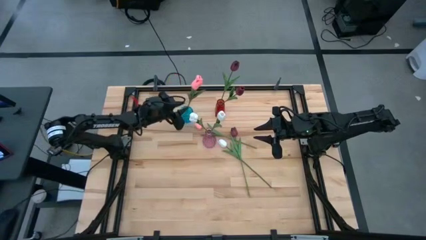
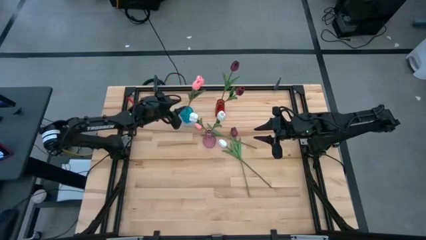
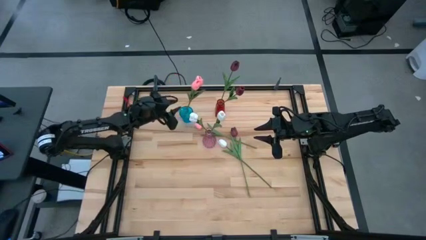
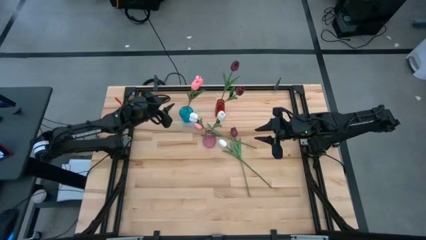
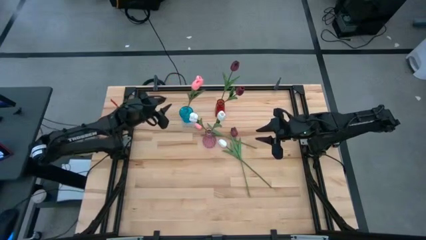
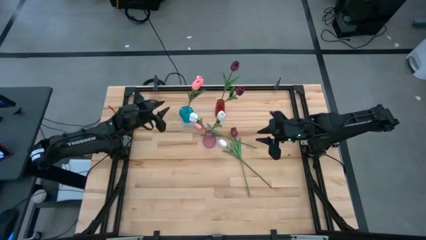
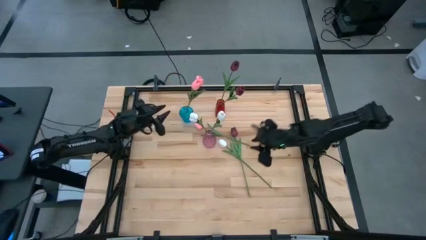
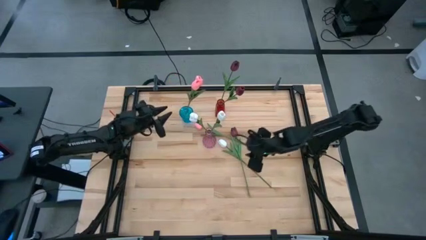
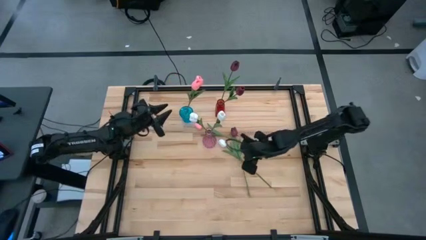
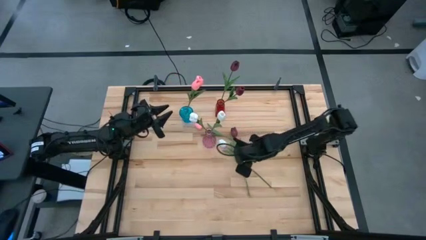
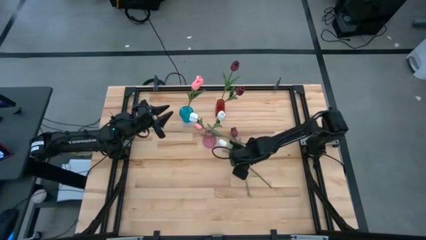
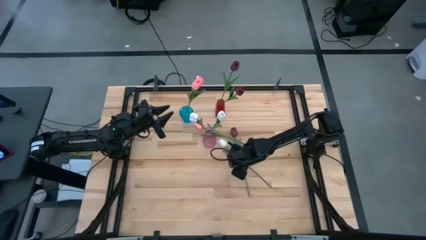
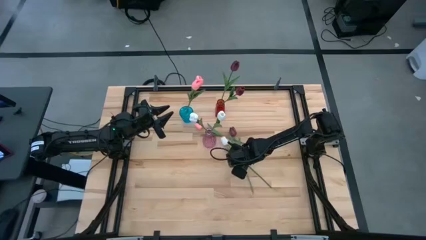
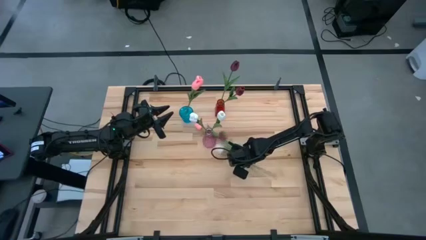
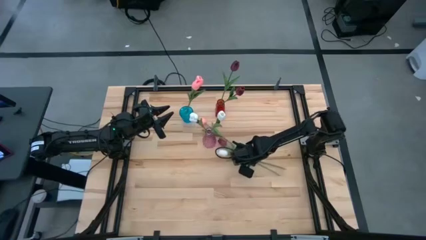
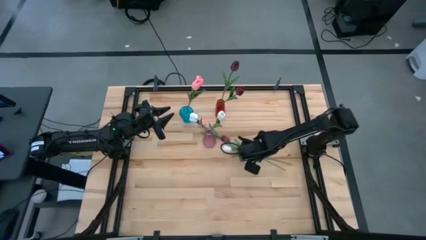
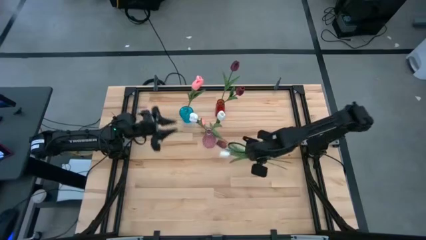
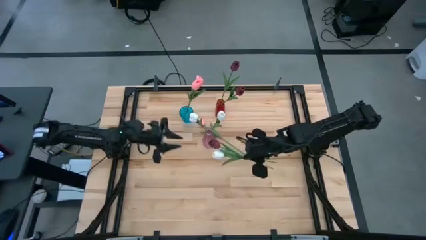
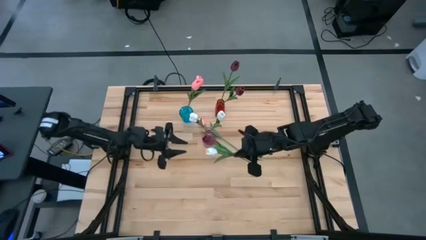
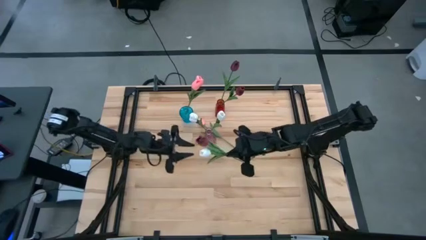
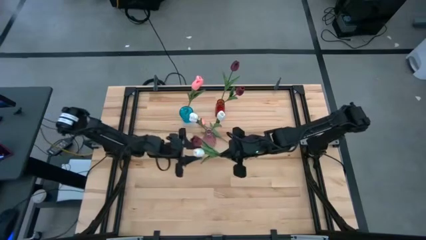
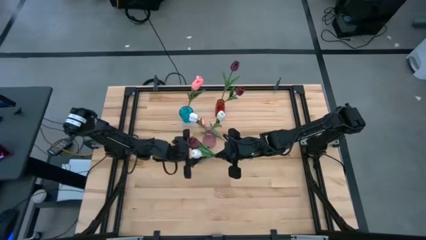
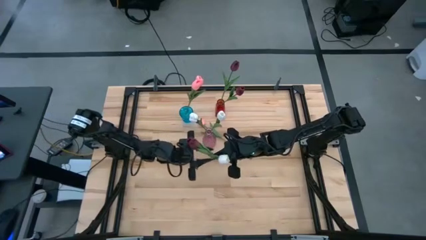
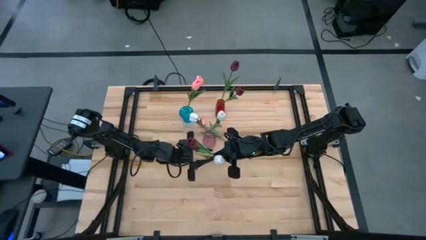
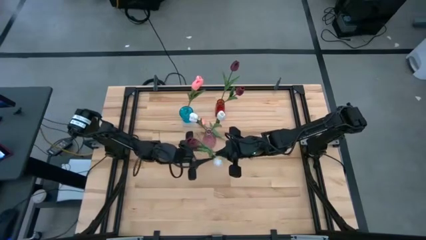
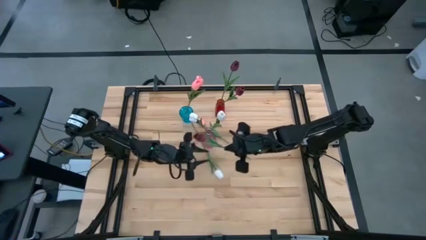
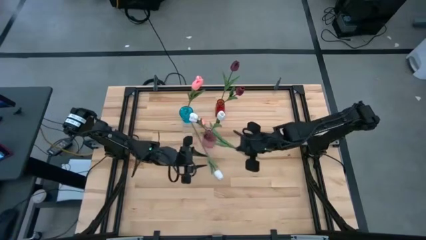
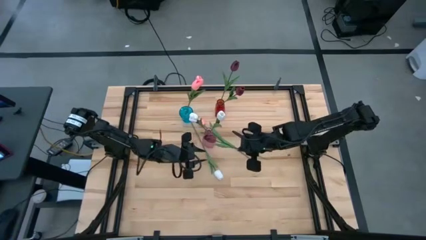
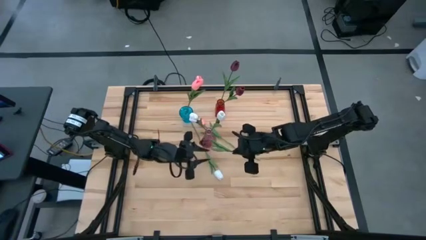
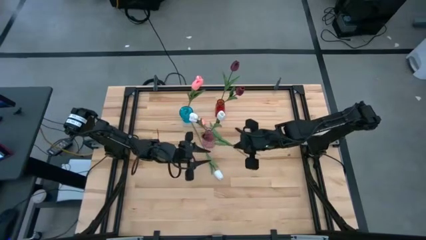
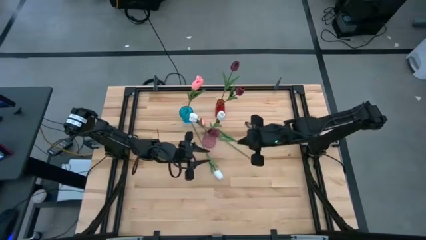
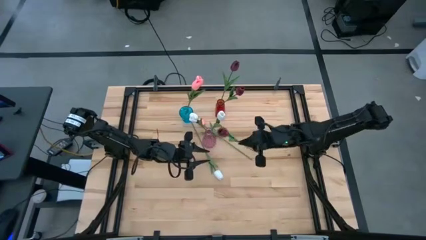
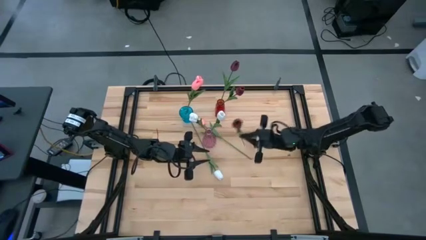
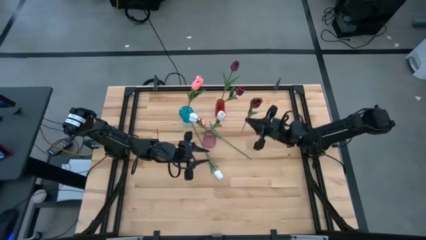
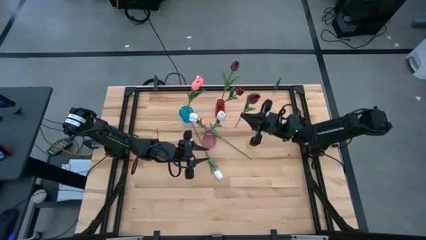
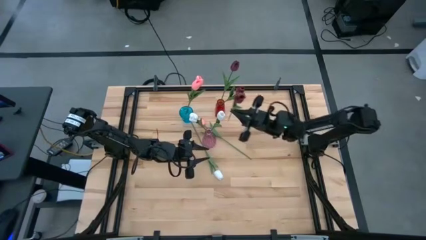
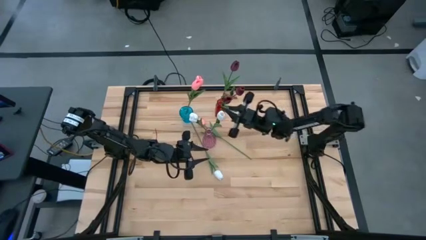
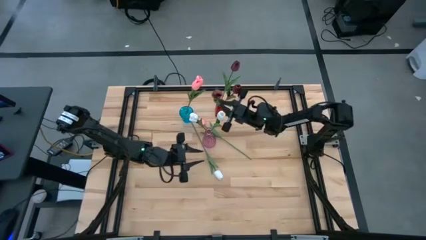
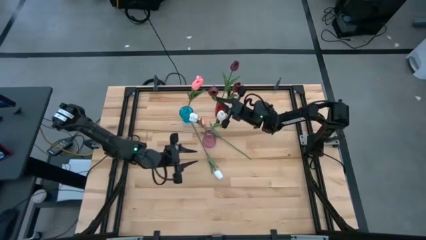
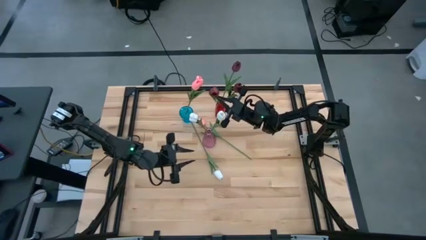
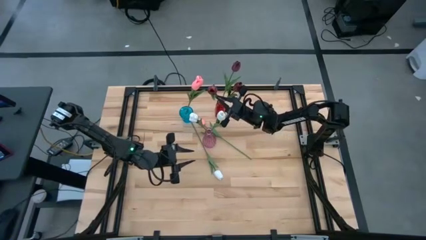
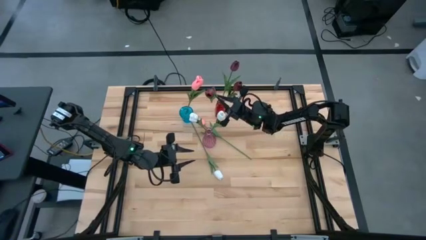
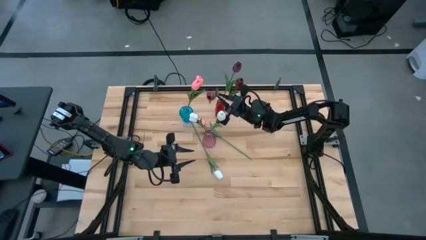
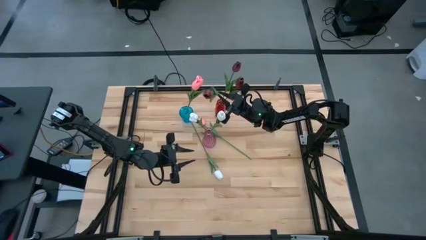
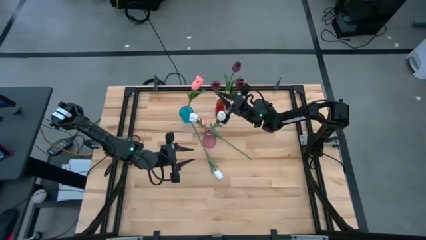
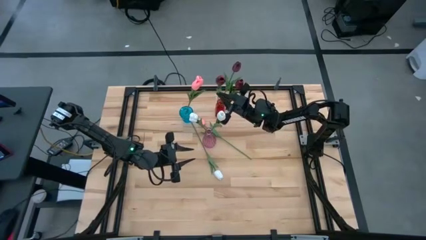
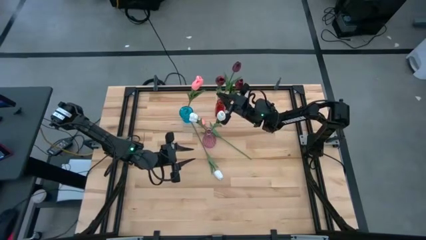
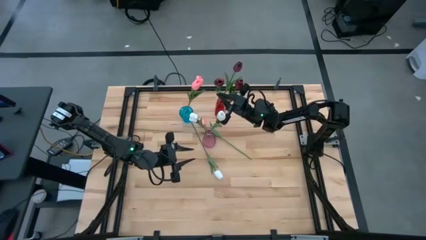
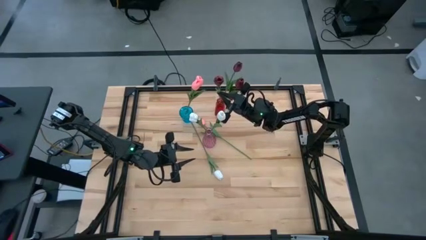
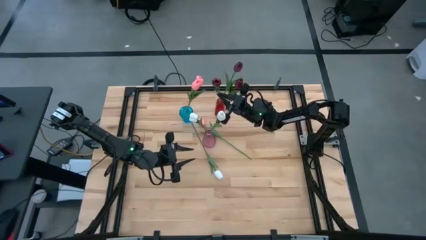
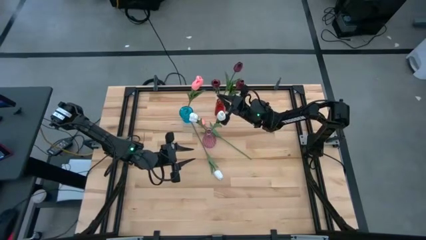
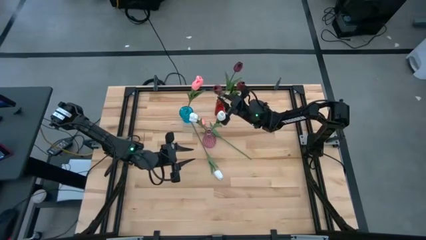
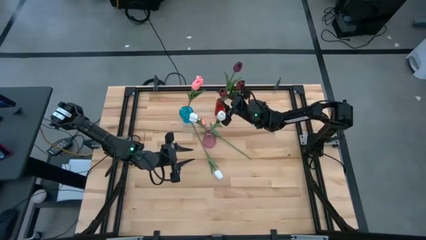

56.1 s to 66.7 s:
Task: Sort flowers into vase by color
Put the red tulip into the red vase

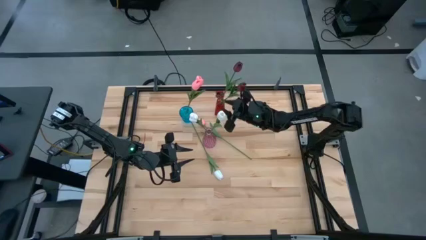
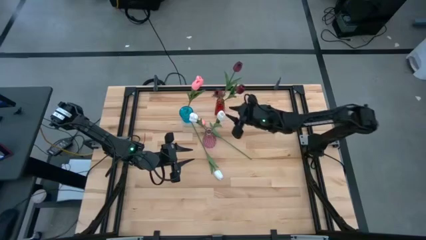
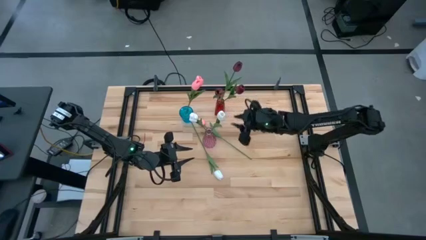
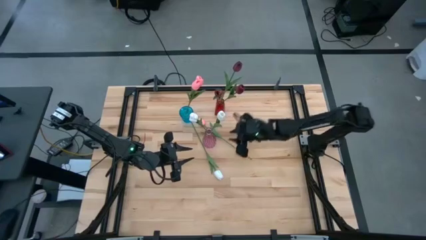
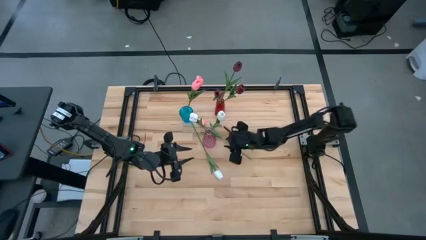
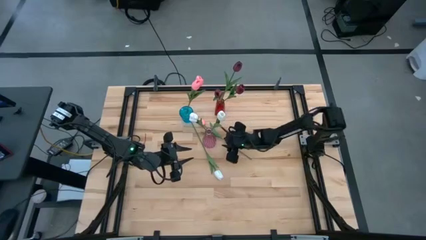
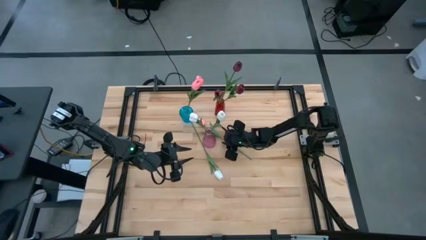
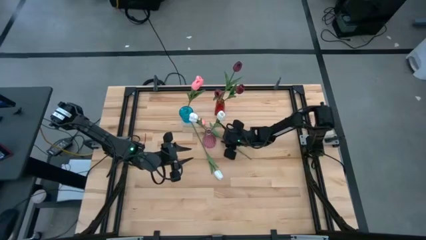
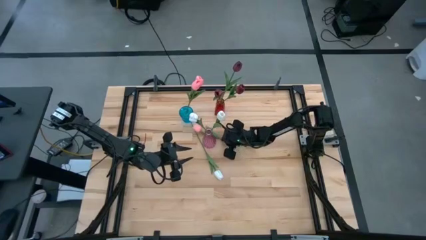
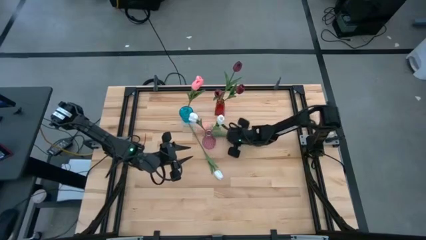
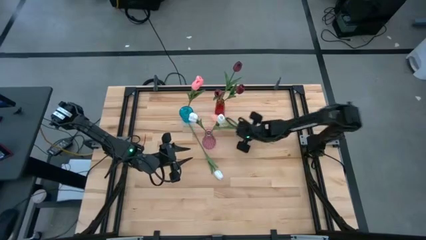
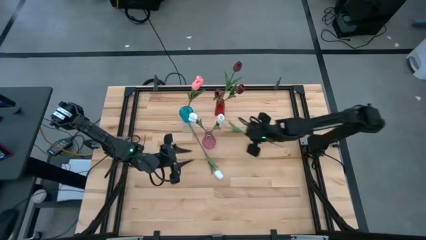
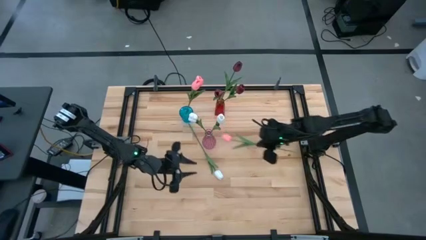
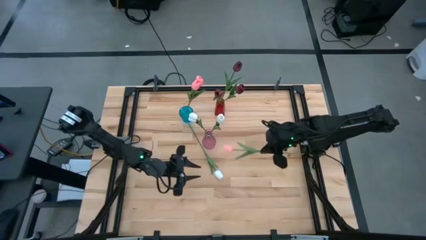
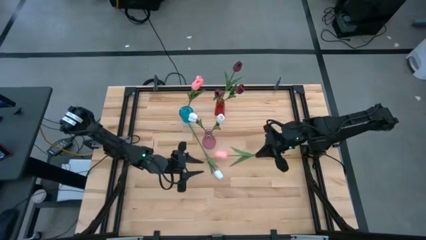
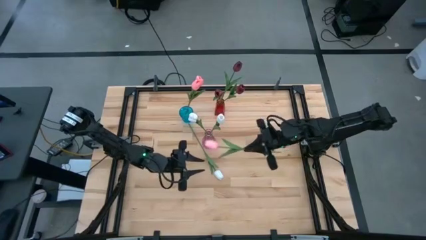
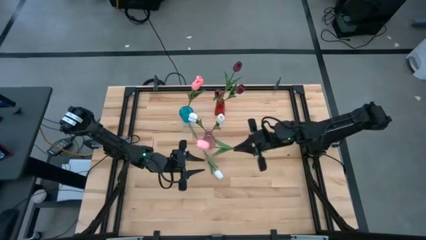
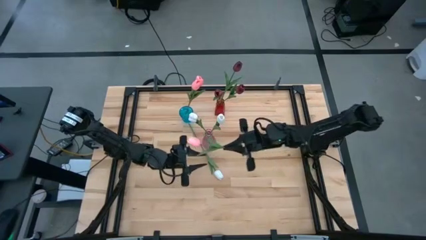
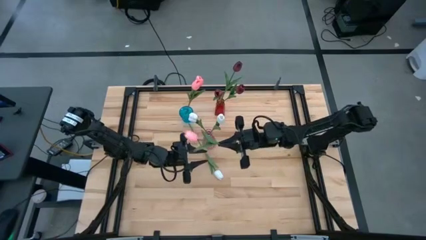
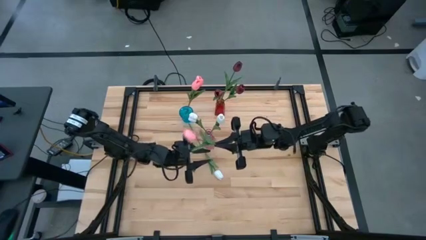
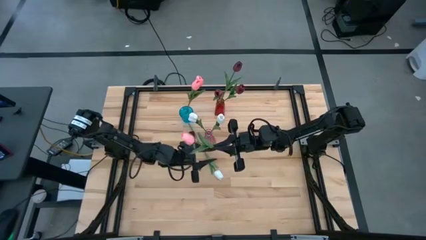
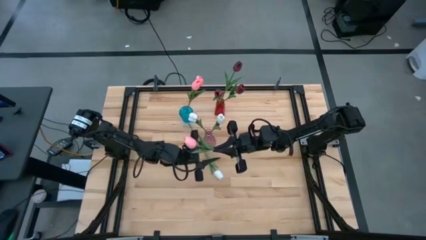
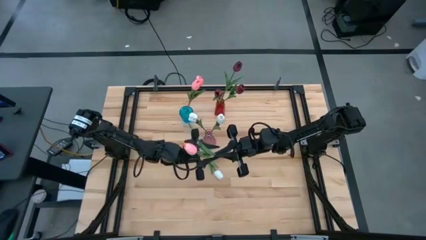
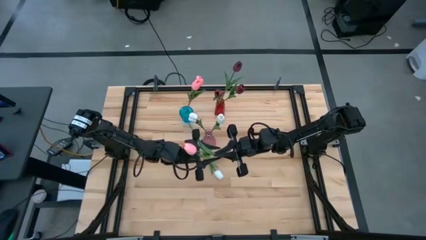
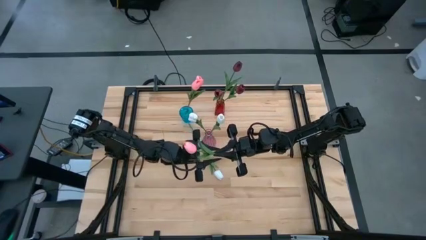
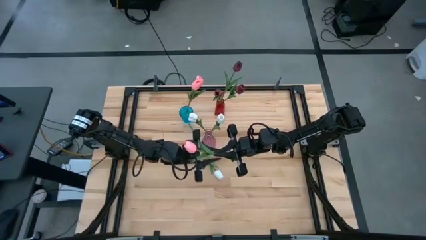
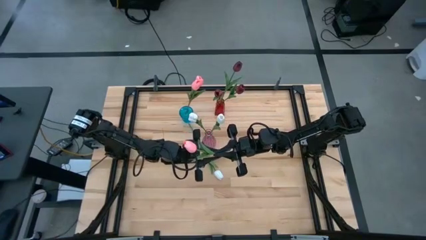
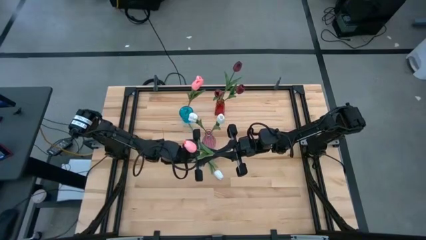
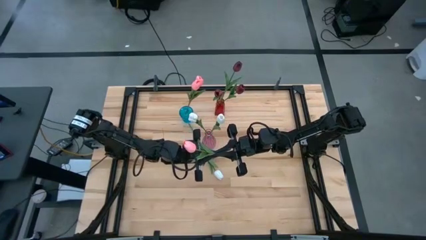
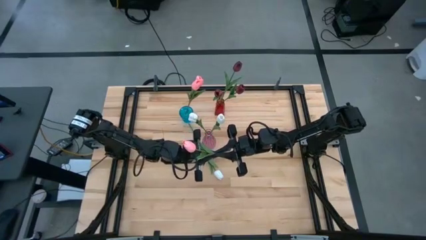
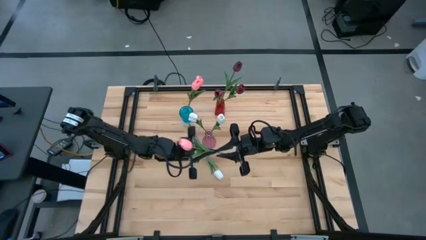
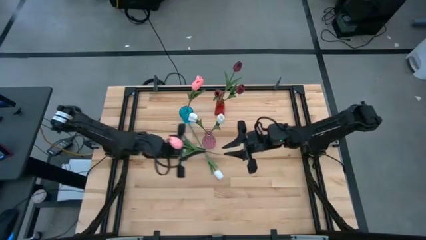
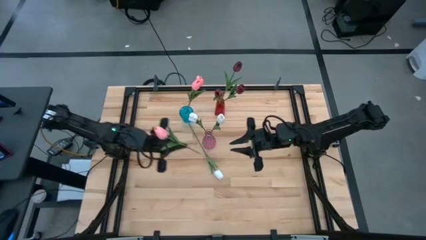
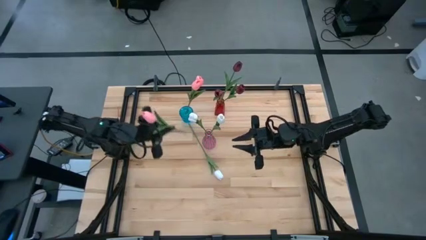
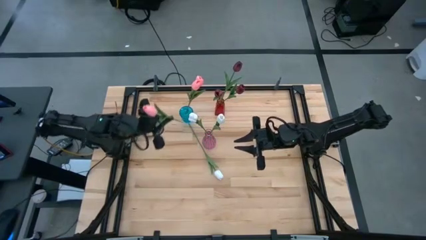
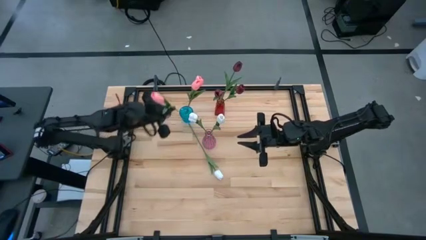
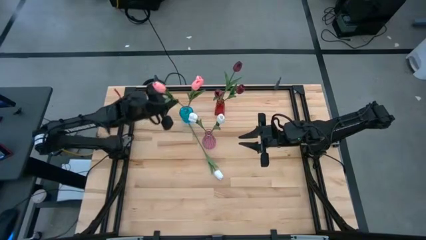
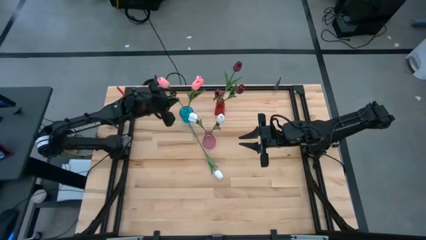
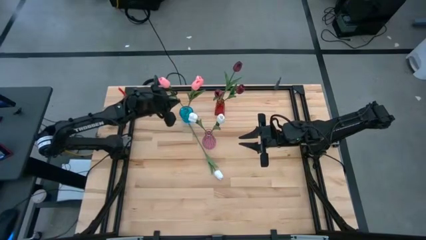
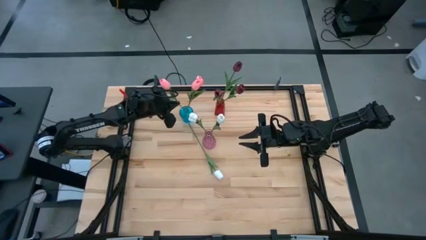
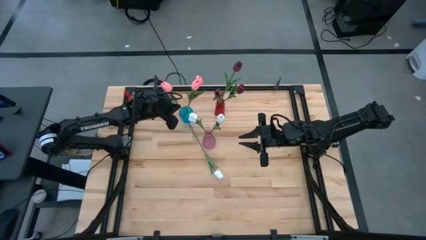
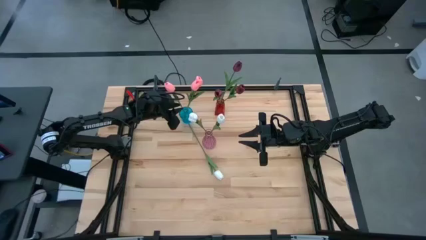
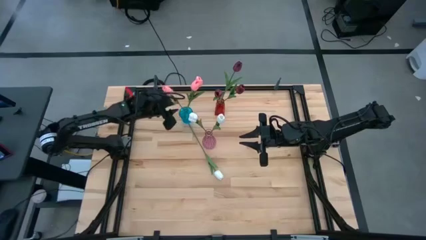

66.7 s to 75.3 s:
Put the pink flower into the blue vase
